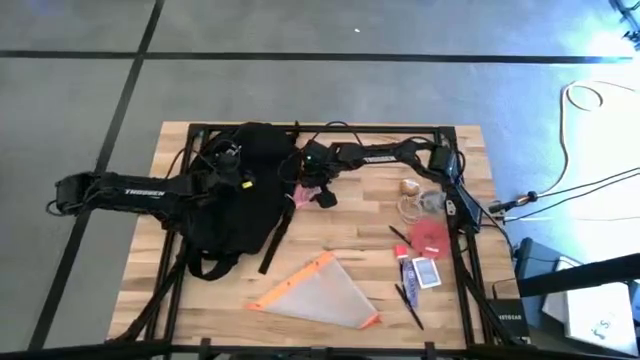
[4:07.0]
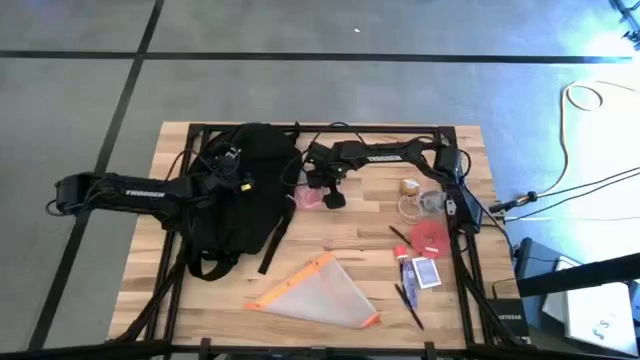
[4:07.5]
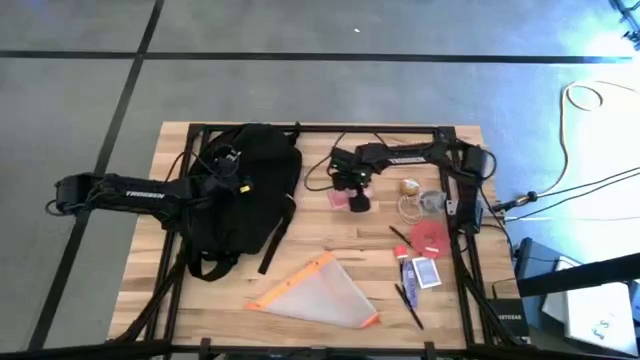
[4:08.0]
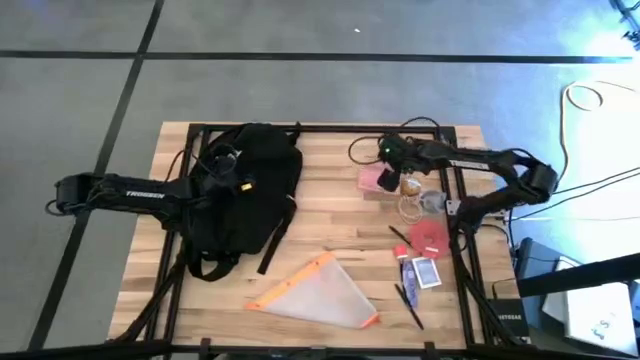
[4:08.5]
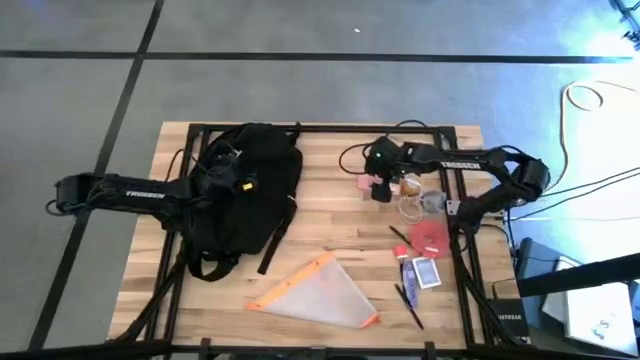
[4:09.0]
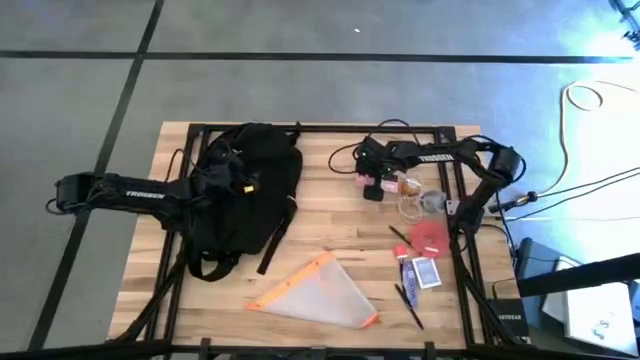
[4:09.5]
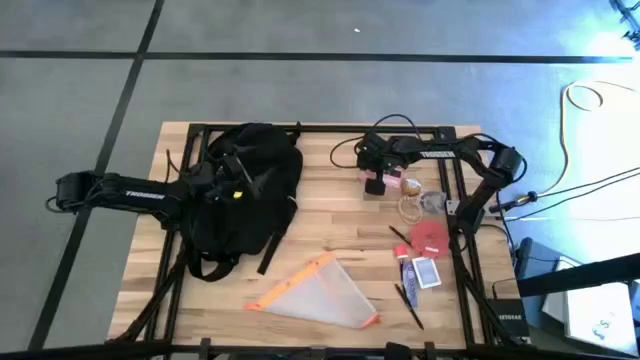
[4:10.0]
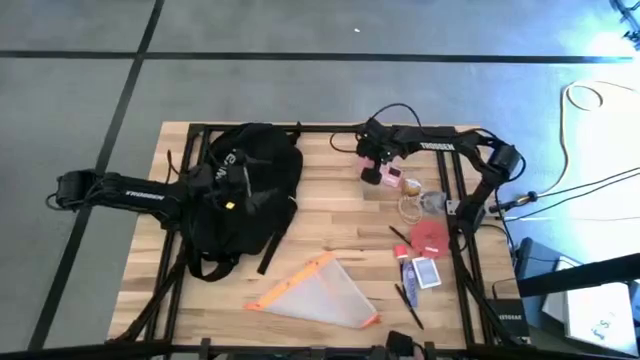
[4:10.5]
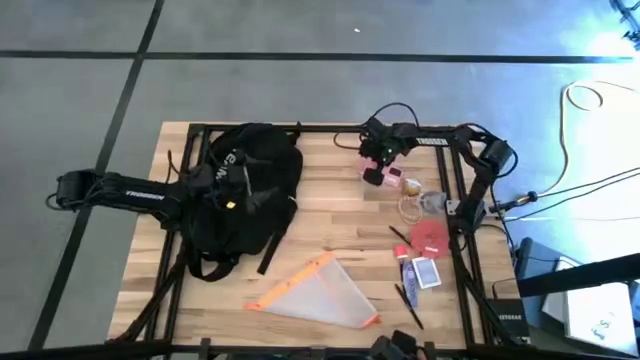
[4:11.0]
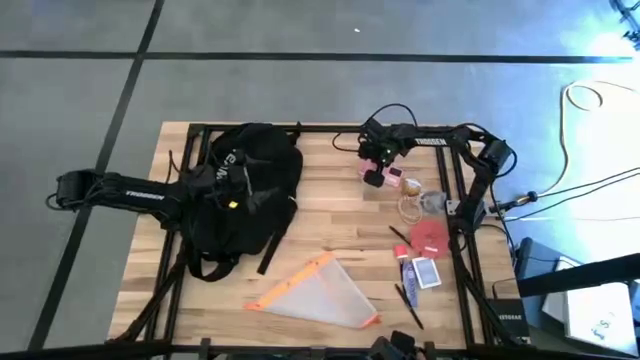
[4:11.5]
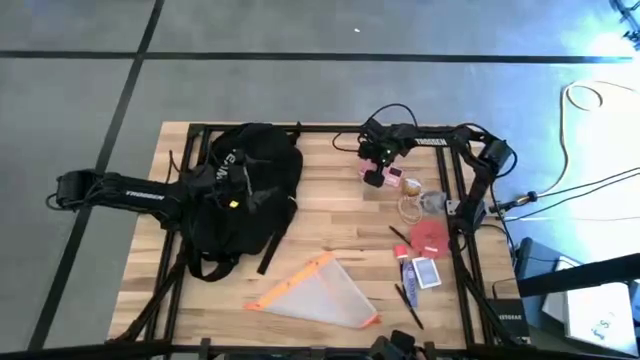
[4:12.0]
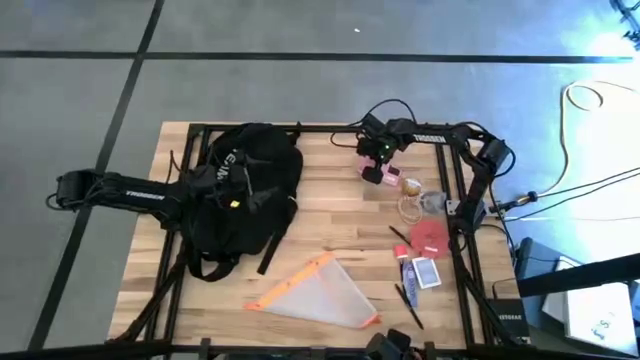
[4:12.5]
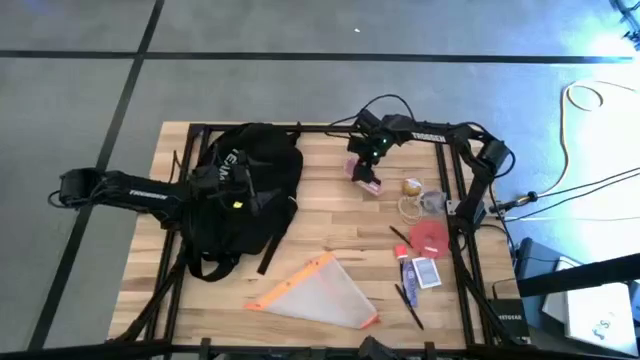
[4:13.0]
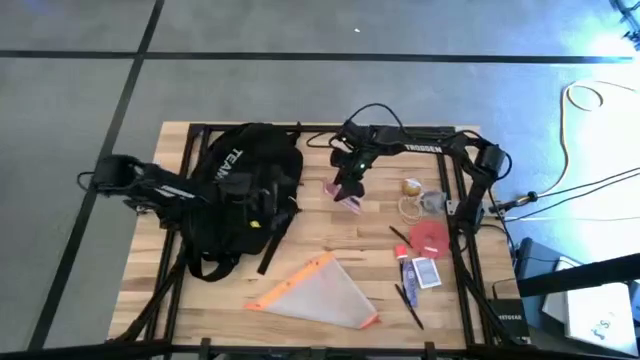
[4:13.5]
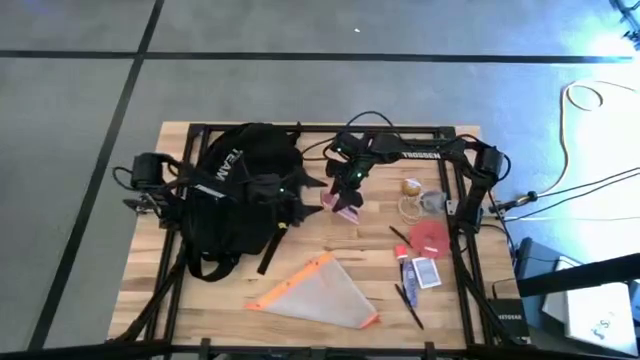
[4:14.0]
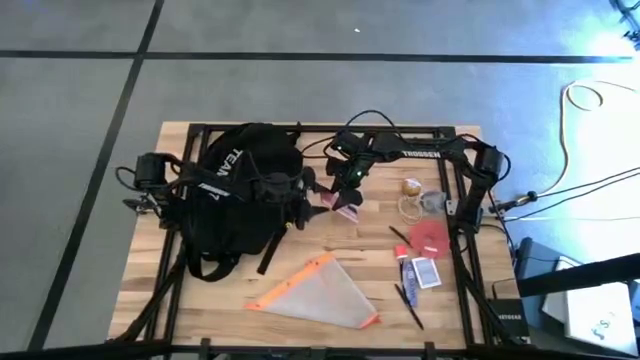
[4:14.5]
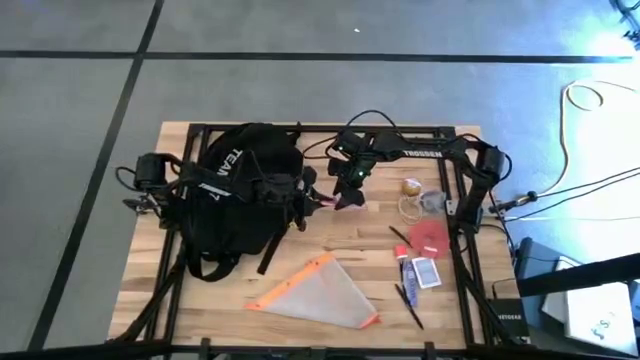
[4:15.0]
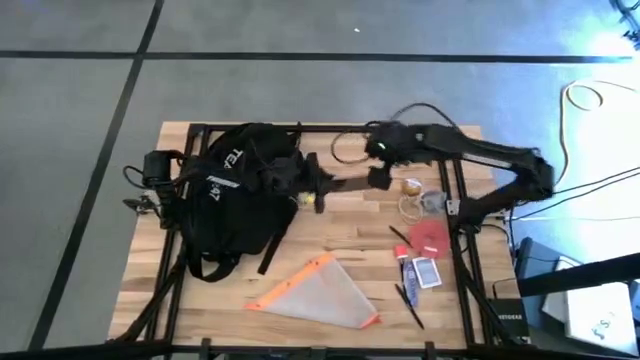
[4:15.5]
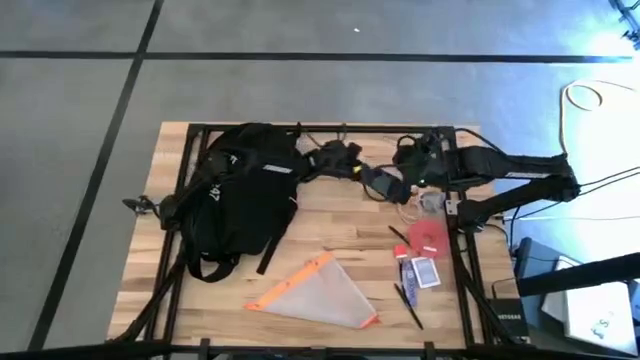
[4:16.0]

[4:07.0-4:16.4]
Task: Unpack backpack
Remove the pink cellphone from the black bag

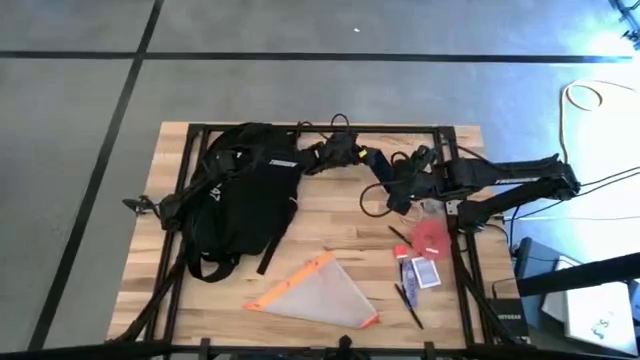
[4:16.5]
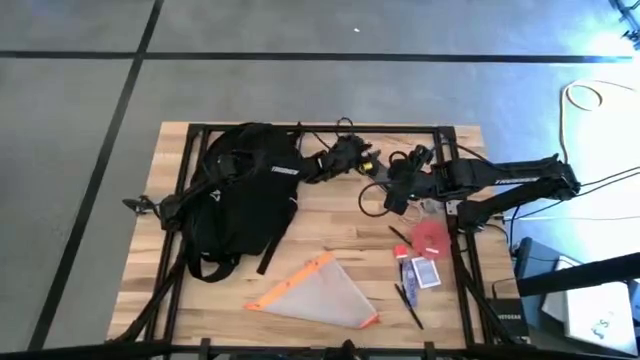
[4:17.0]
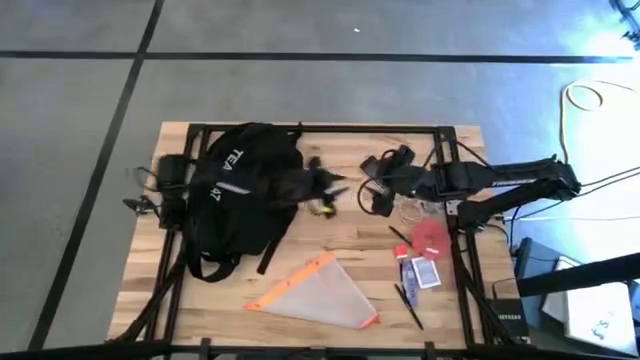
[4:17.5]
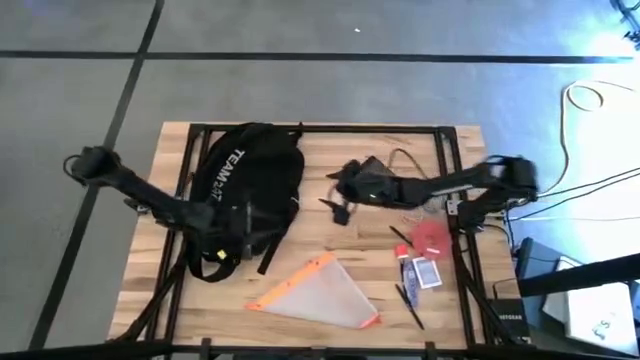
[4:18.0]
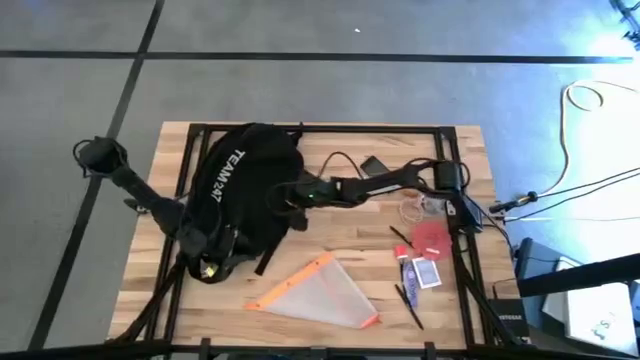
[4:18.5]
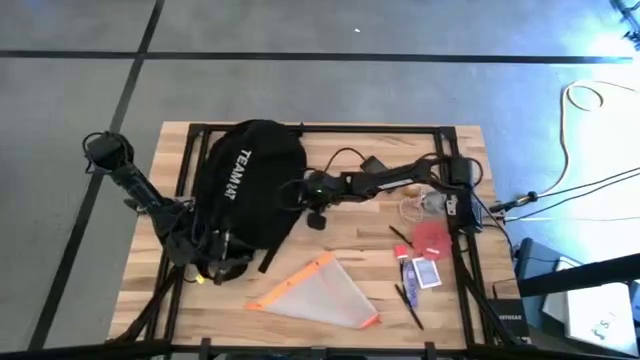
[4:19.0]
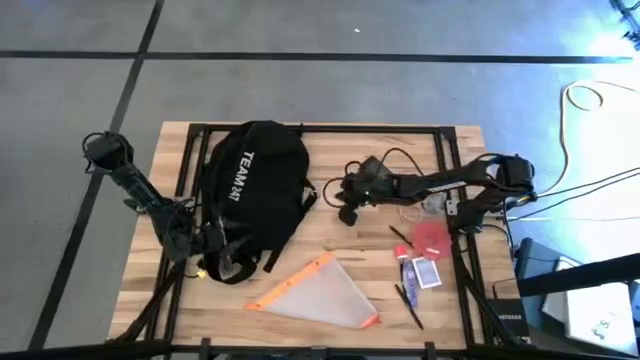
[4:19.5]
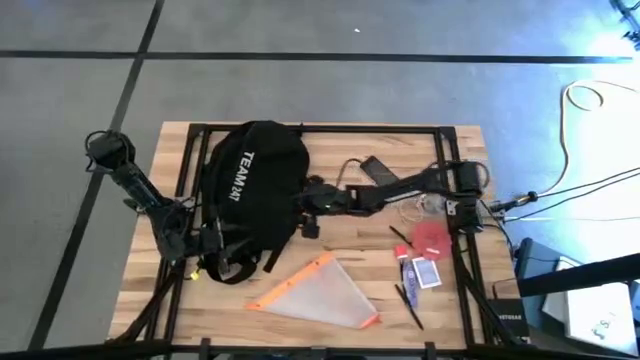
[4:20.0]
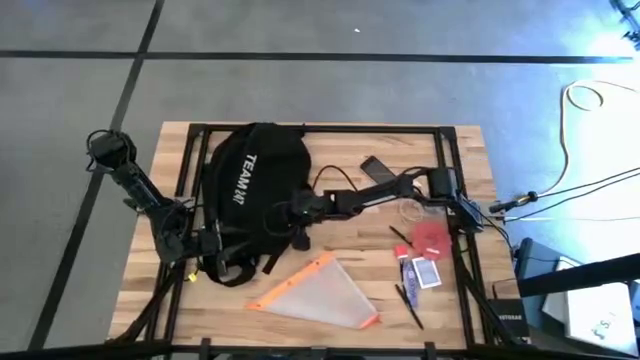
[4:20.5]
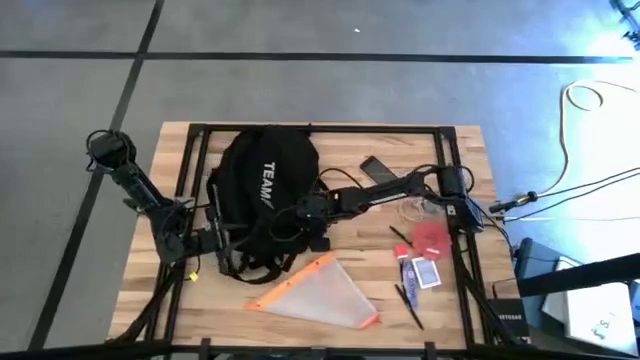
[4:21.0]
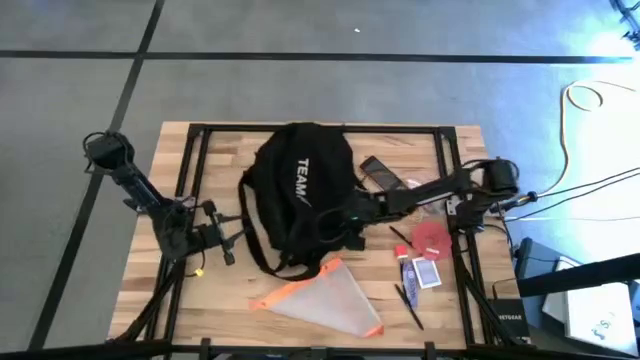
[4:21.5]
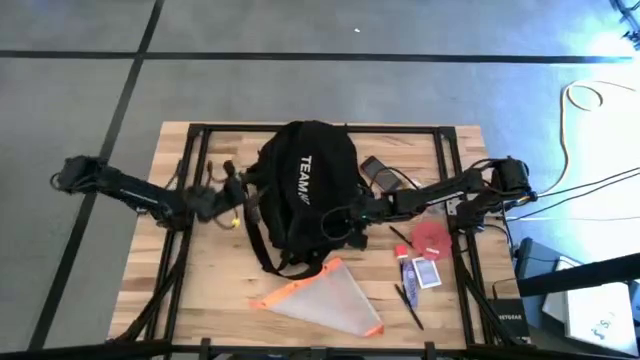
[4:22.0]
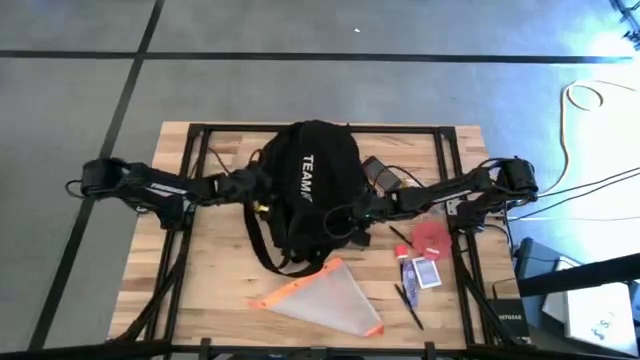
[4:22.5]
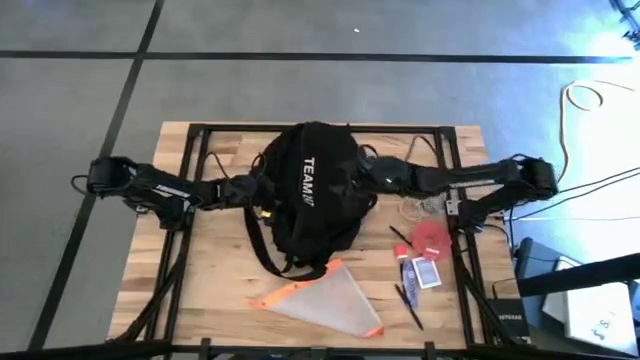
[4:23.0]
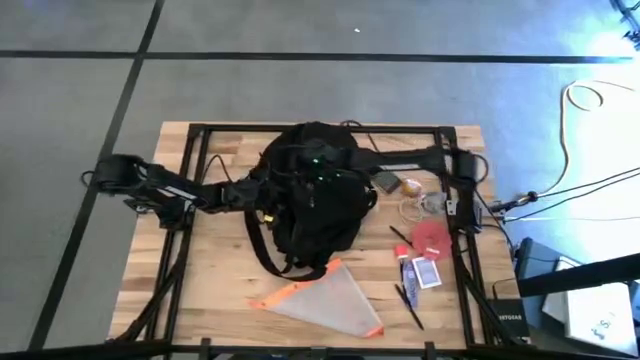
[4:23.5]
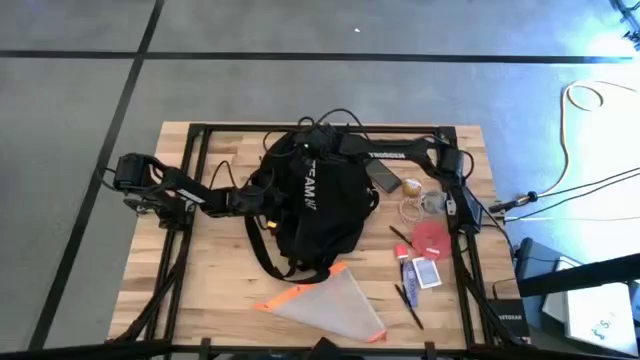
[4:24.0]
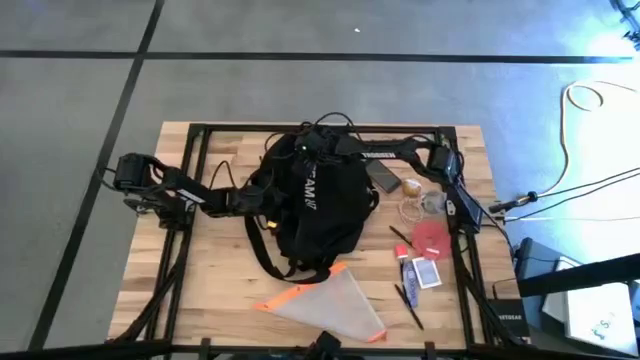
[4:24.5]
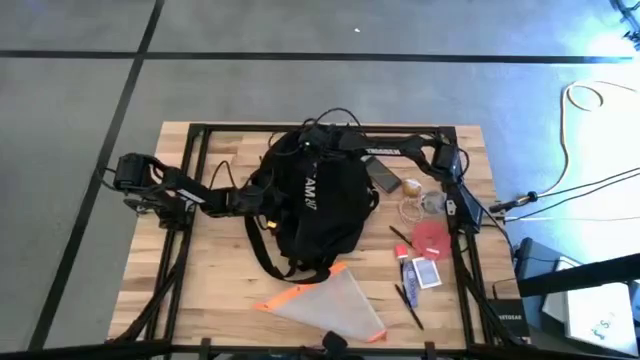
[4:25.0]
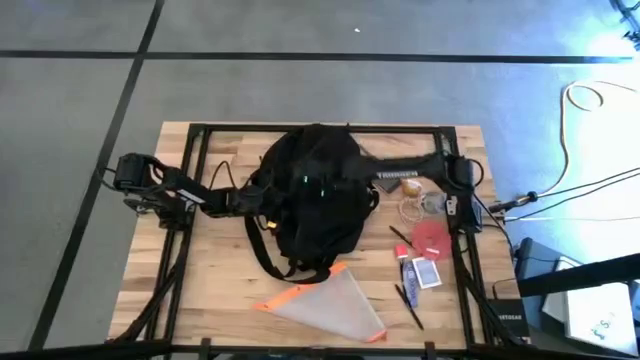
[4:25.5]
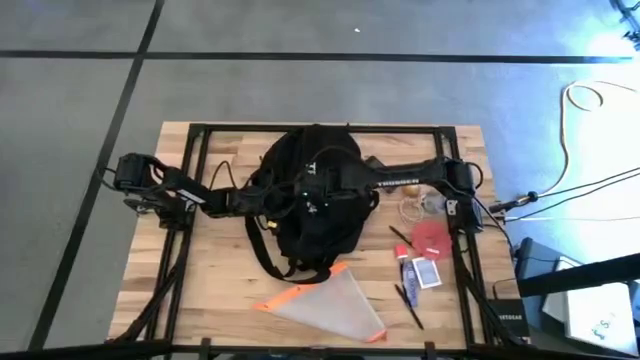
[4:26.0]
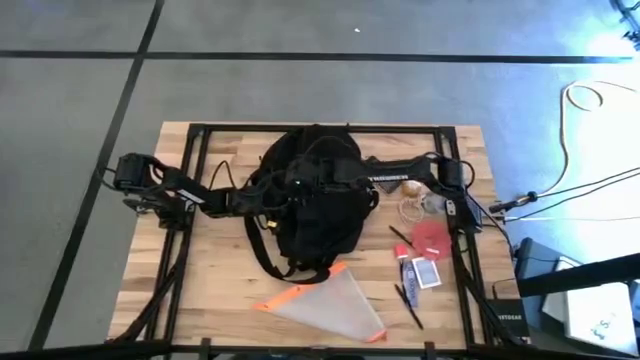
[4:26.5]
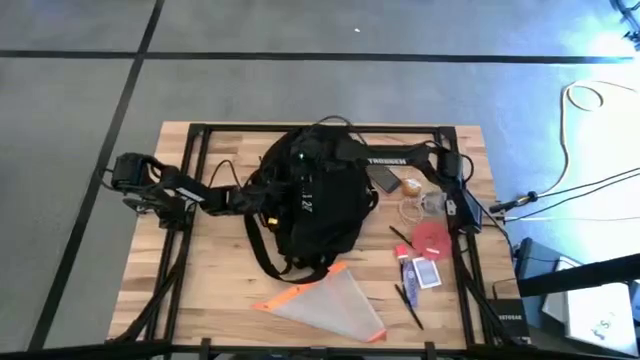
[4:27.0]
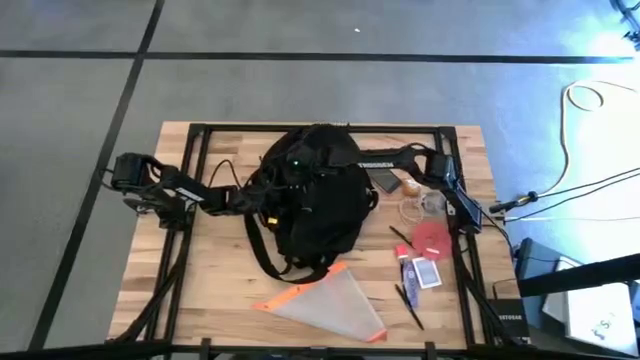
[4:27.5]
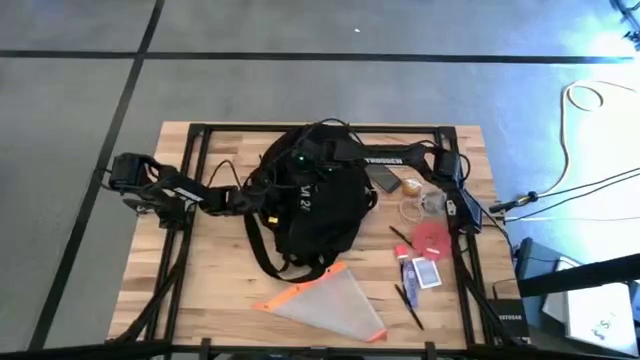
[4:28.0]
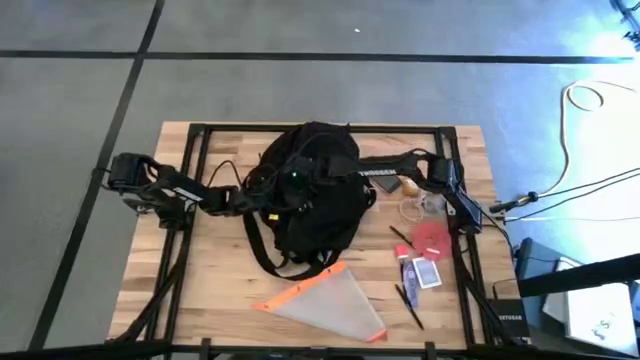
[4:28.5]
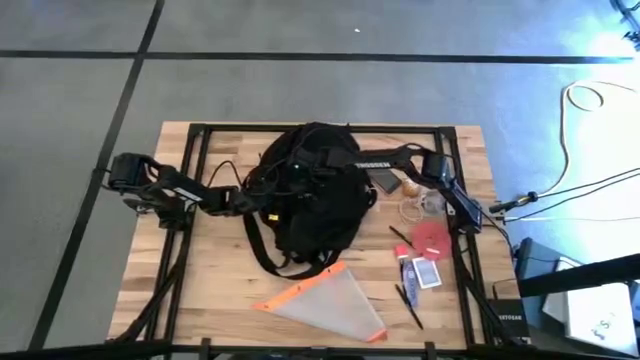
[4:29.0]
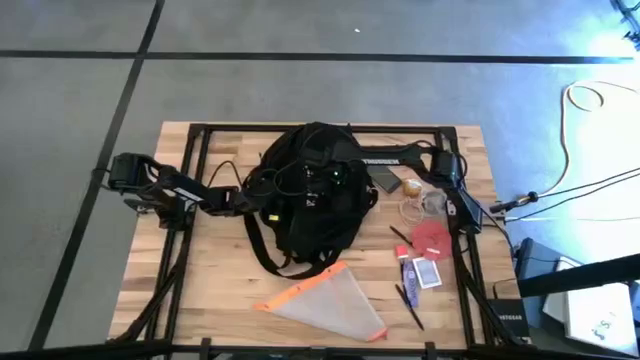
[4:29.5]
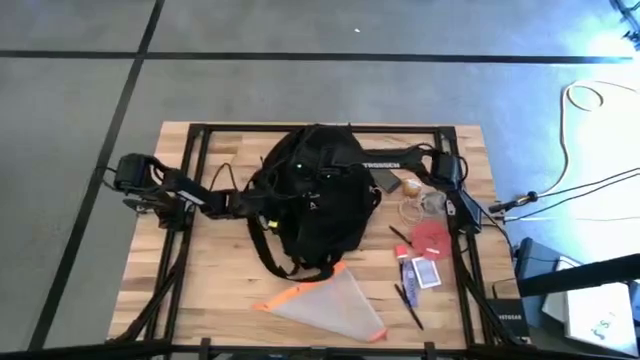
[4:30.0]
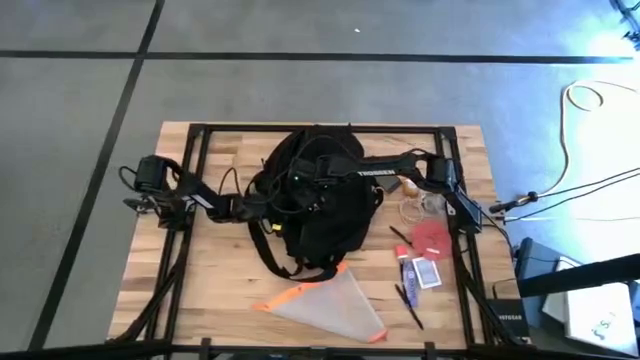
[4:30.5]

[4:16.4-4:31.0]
Move the black bag to the center of the table
